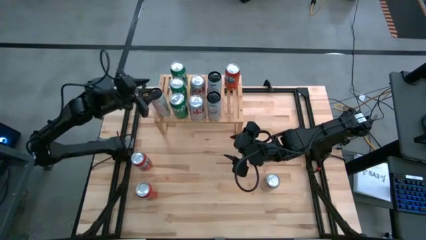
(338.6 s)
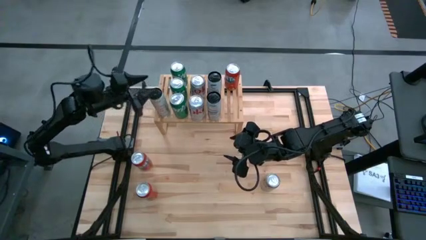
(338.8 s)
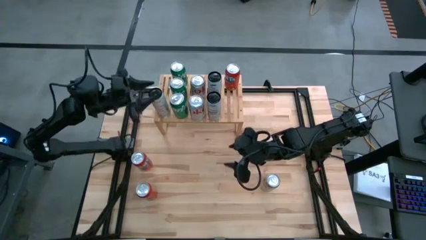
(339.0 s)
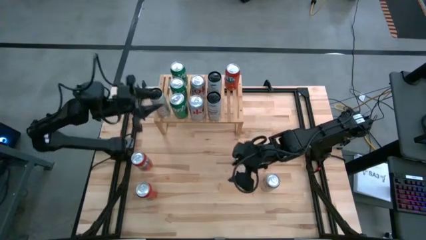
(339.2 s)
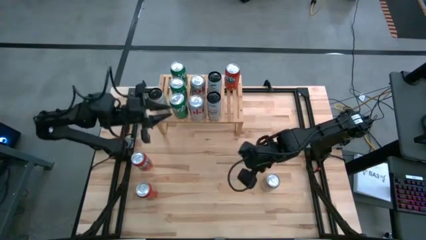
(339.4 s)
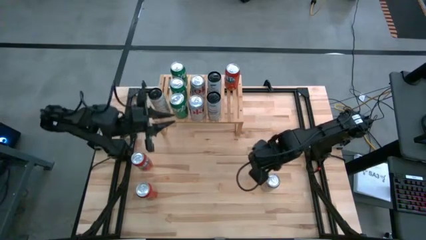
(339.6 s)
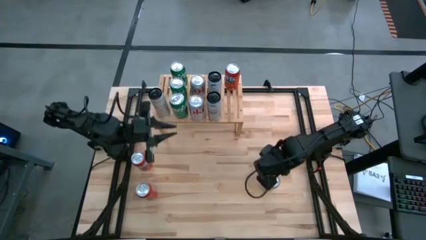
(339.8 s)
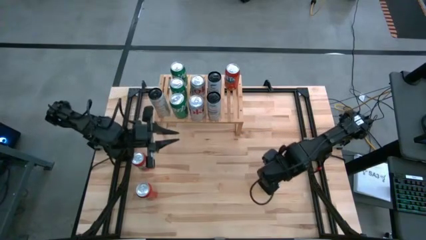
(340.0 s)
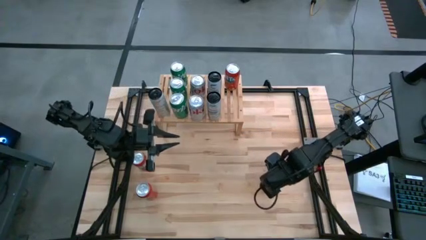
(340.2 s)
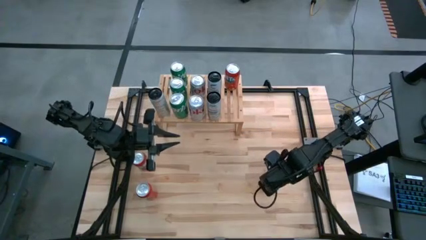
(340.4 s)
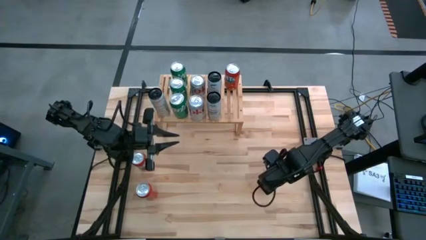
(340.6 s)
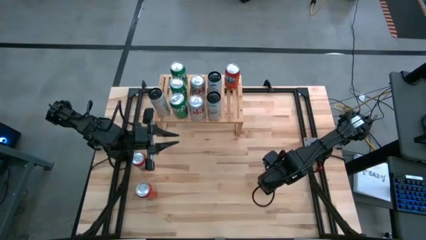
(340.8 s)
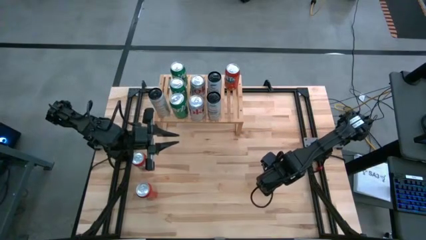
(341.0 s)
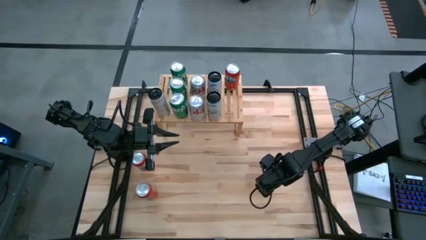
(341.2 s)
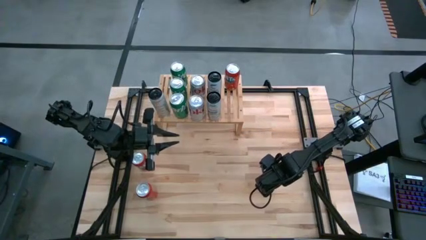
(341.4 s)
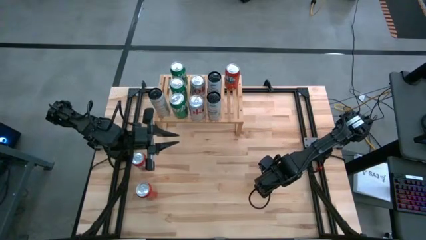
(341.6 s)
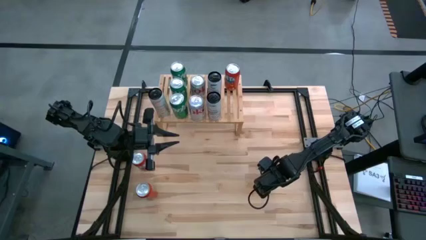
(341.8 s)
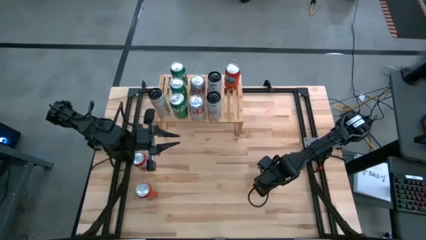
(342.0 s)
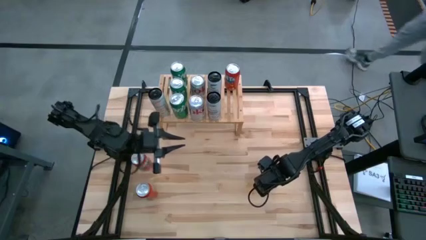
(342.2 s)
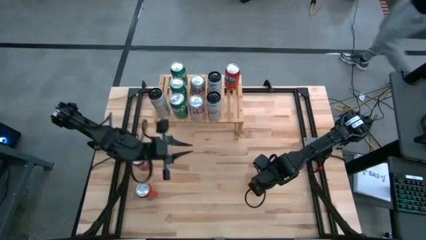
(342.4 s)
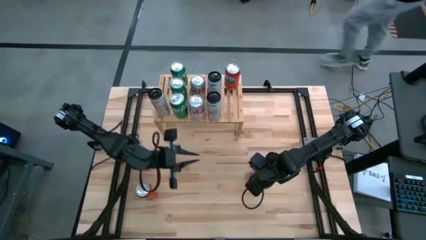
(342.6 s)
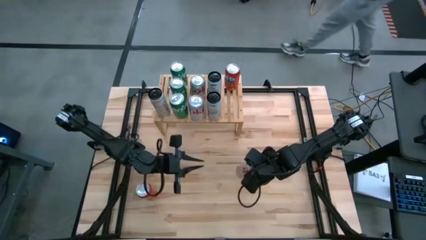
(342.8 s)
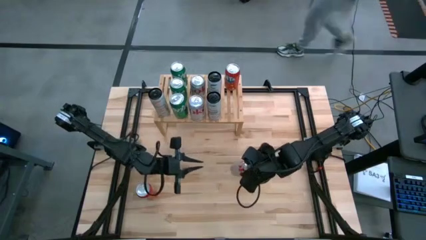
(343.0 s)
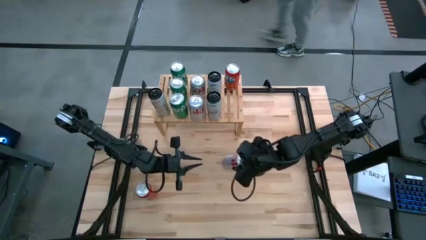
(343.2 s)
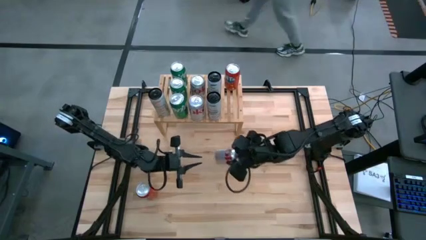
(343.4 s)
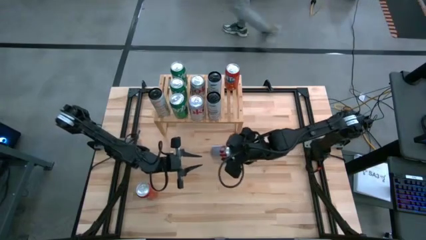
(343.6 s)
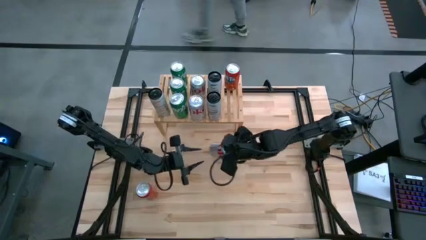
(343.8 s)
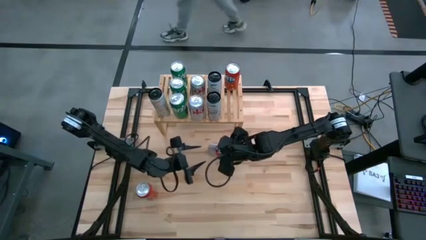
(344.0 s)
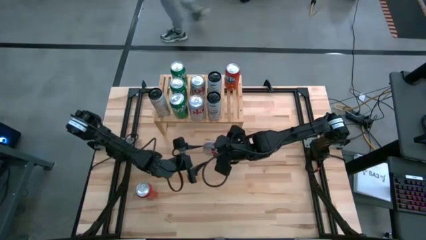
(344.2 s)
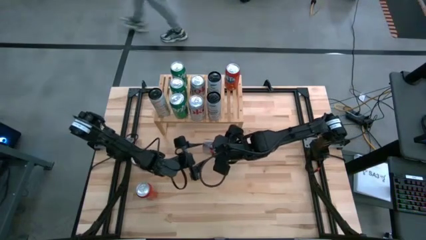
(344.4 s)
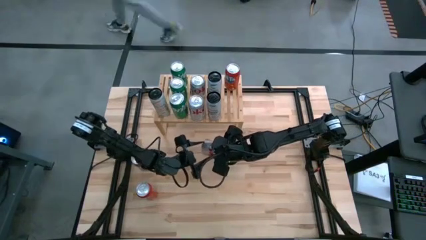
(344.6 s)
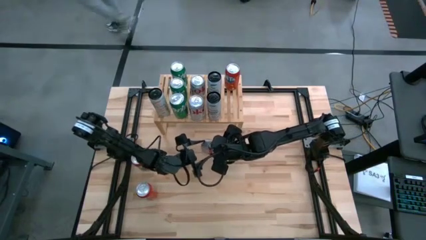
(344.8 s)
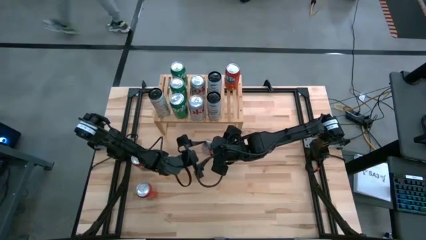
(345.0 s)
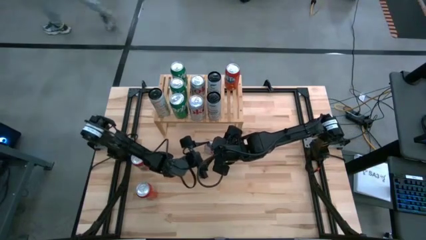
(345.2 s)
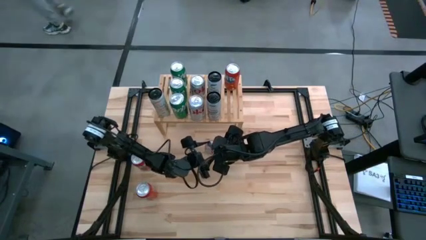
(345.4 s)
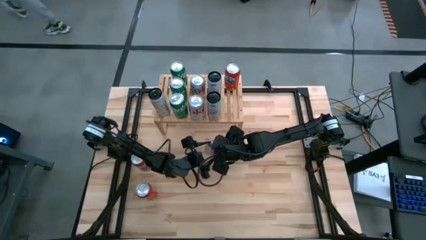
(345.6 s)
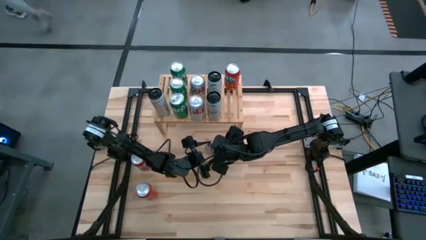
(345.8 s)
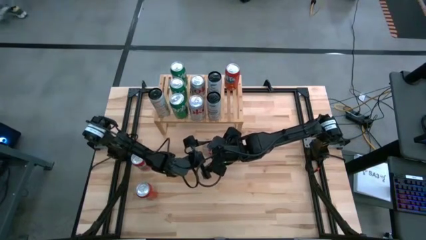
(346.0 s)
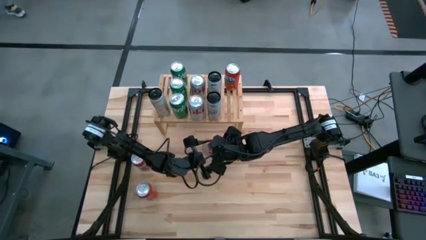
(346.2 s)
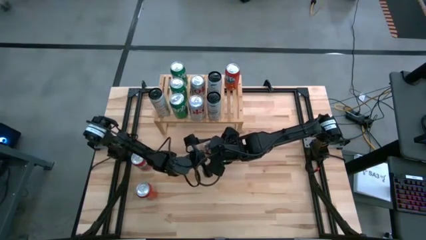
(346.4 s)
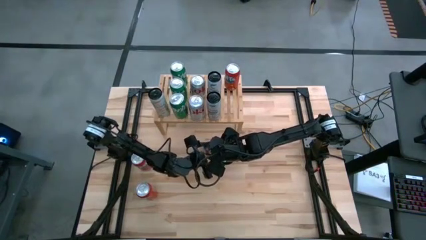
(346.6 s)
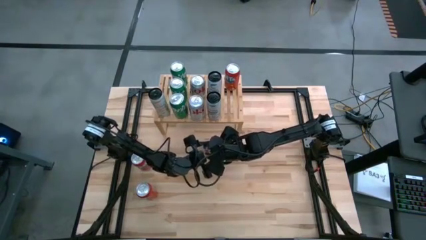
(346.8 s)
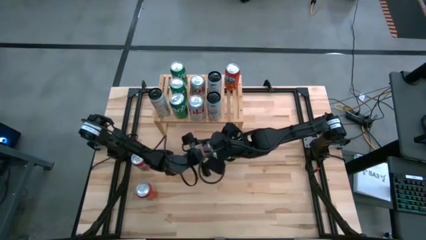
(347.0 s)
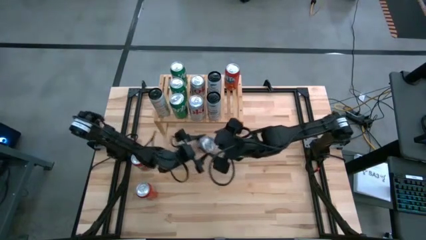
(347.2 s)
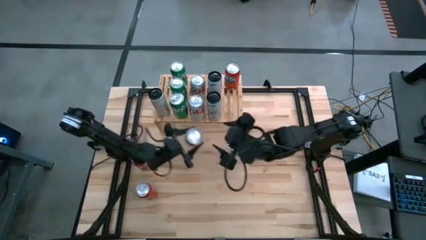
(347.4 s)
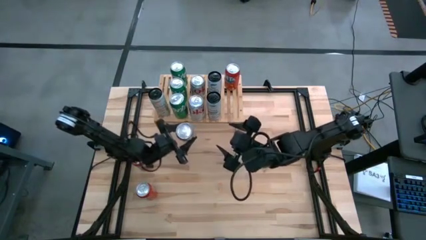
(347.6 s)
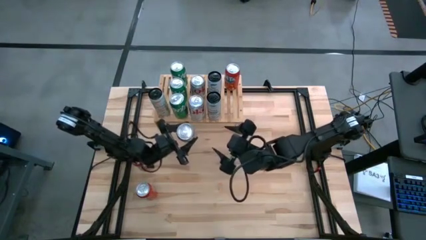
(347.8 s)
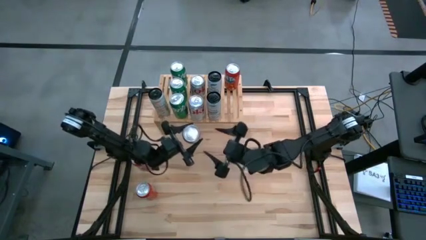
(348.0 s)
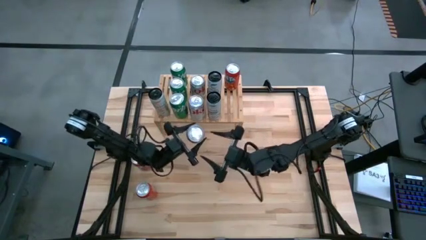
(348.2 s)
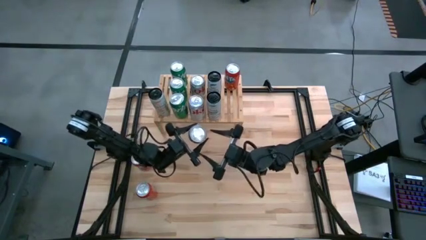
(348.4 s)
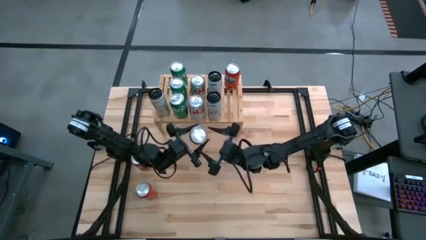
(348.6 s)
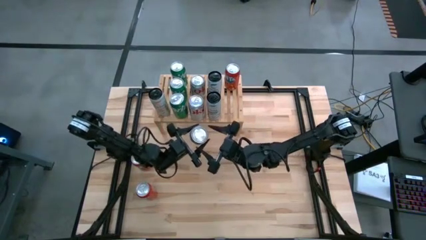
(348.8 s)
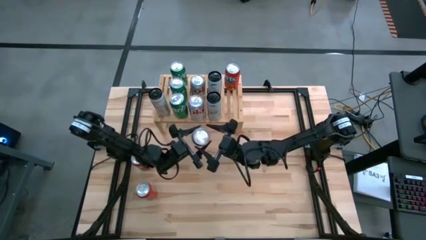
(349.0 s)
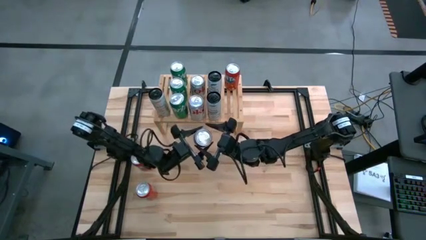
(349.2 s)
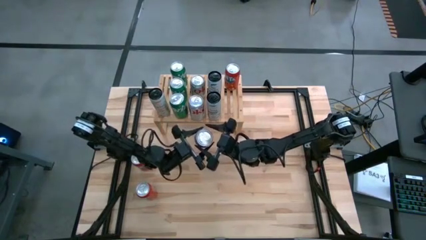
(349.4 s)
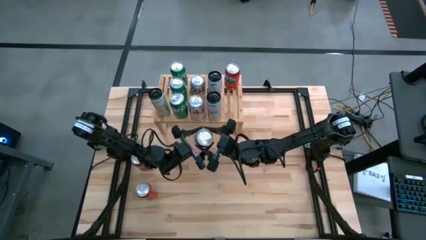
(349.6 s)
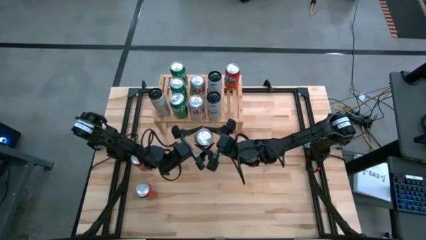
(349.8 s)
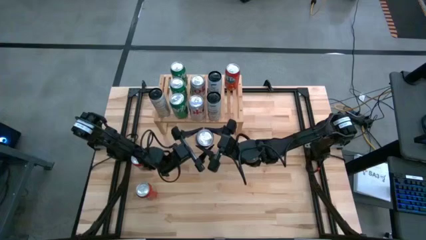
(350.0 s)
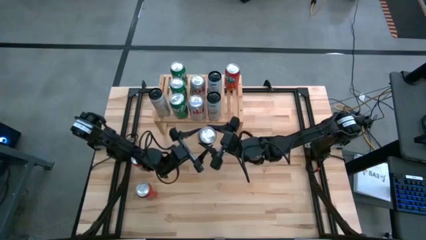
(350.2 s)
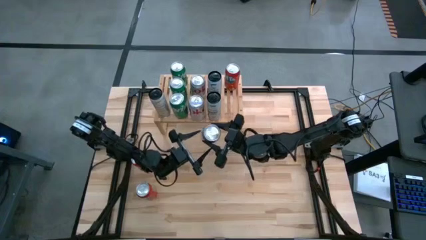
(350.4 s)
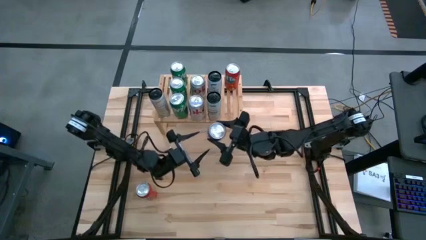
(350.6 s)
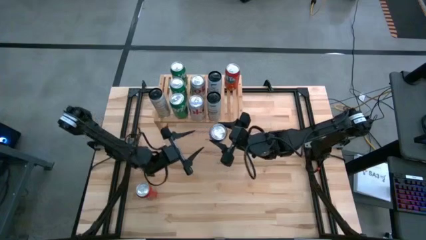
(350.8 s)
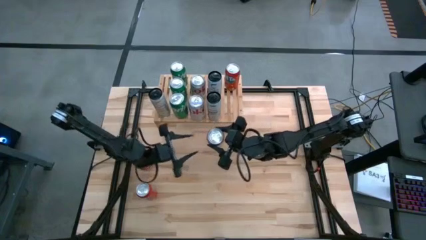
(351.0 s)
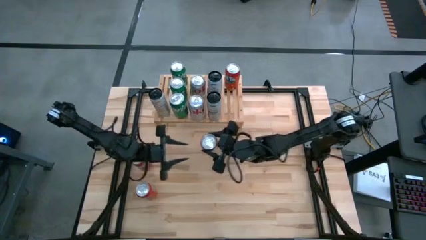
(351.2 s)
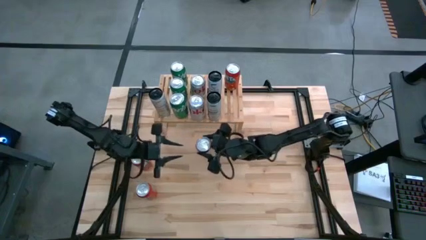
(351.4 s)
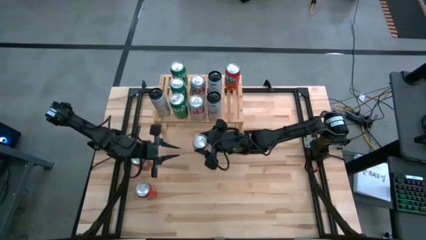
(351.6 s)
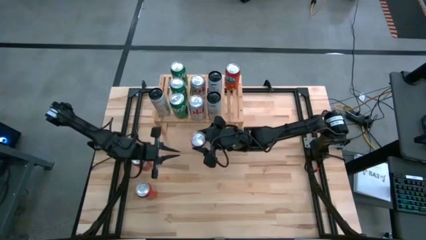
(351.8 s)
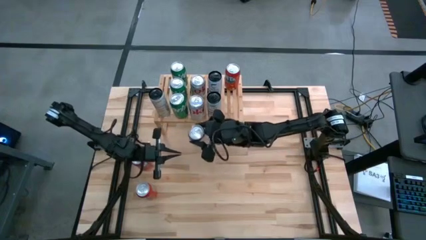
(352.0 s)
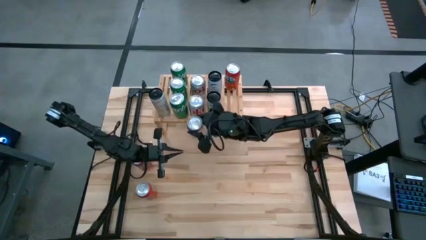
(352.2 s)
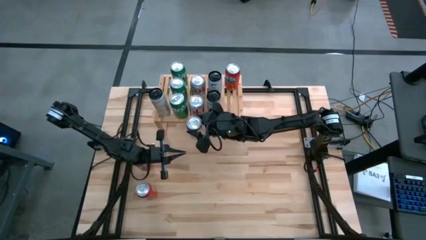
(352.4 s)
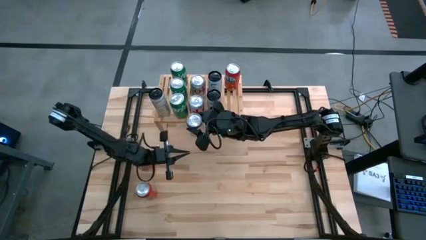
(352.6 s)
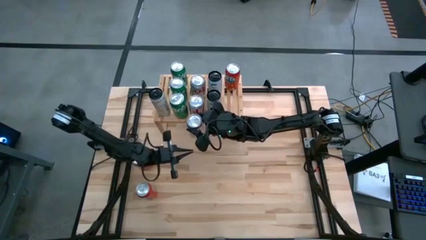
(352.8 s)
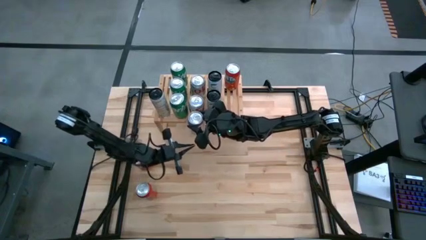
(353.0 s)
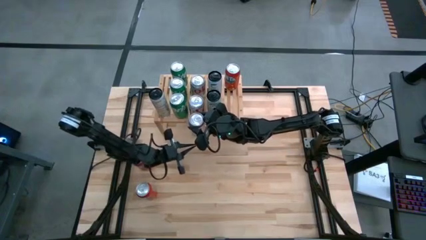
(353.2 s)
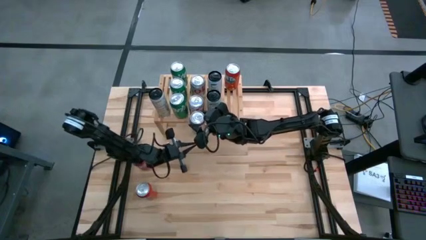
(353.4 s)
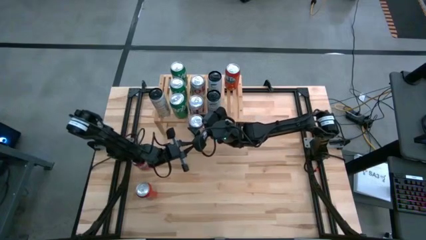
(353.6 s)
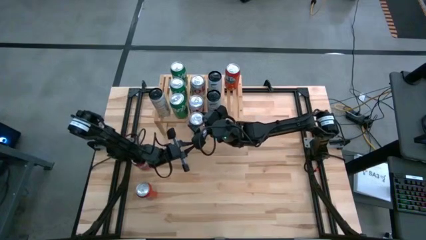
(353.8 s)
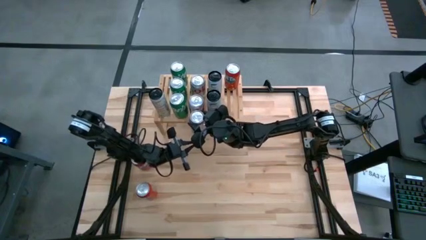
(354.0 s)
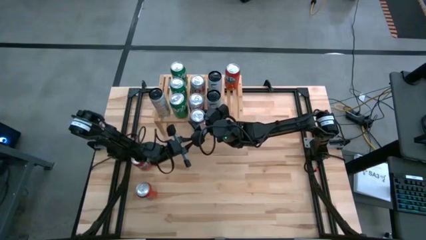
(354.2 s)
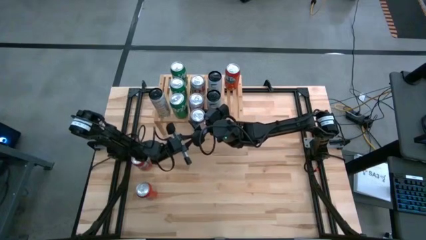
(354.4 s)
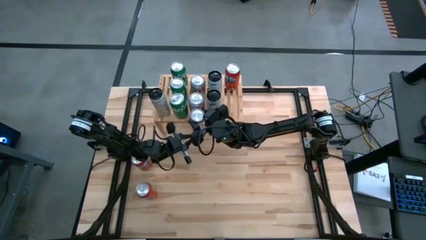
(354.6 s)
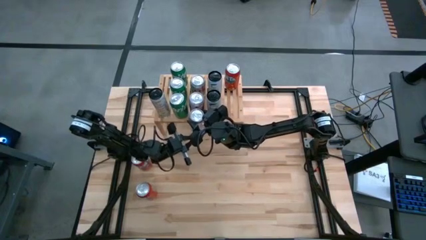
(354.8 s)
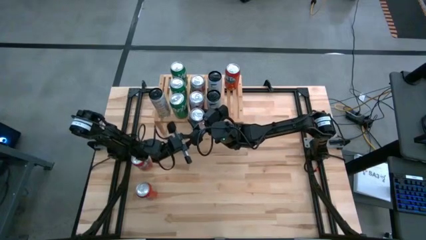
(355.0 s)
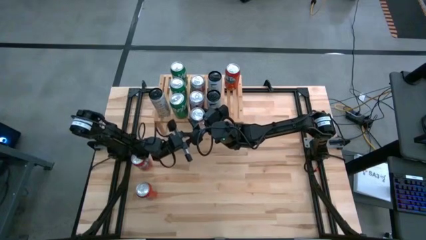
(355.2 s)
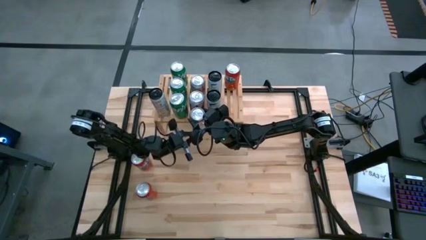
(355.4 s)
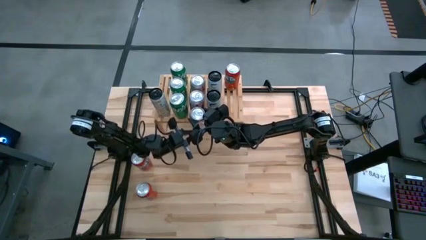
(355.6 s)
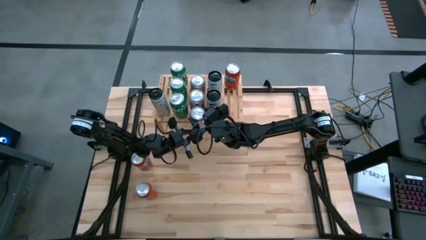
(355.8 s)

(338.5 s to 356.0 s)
Task: Place canned beverage on shelf
Put the white soda can on the shelf
